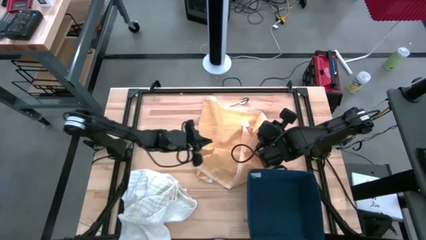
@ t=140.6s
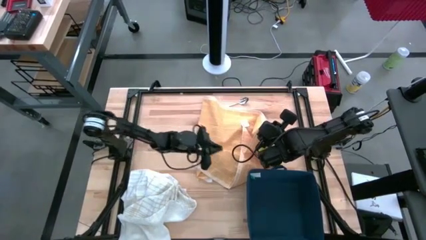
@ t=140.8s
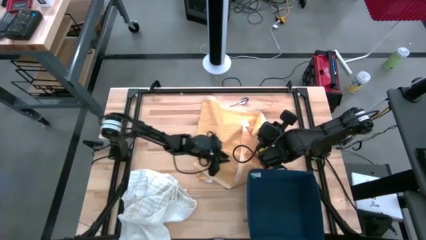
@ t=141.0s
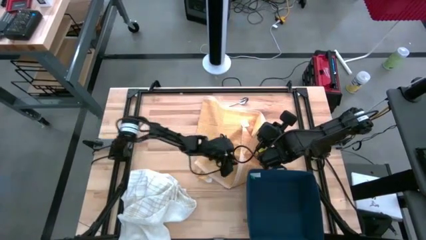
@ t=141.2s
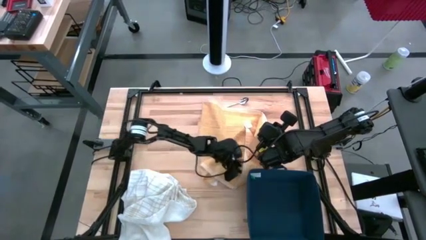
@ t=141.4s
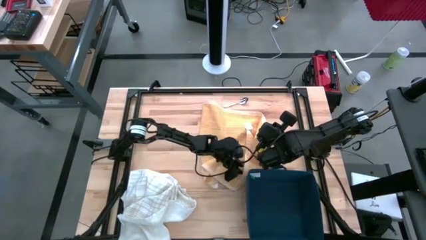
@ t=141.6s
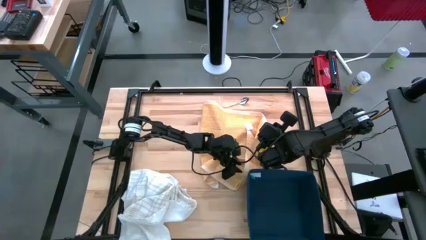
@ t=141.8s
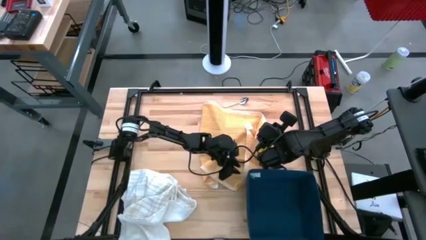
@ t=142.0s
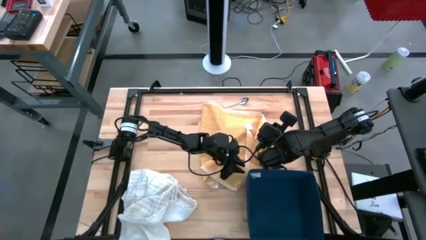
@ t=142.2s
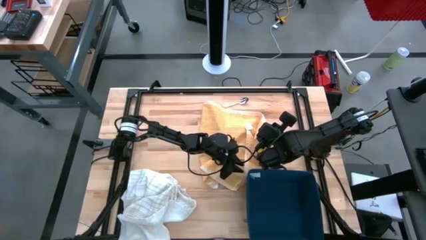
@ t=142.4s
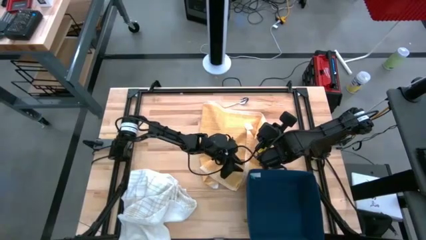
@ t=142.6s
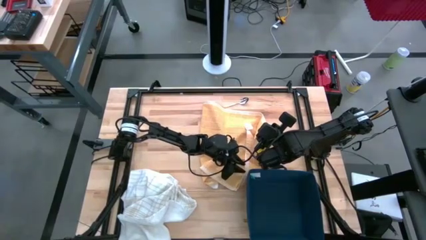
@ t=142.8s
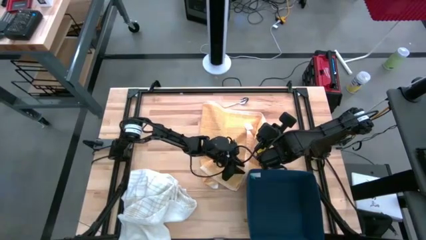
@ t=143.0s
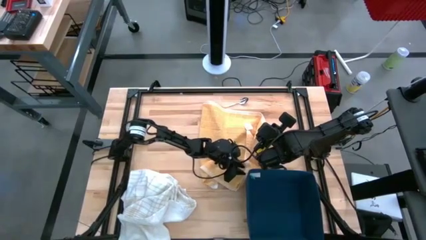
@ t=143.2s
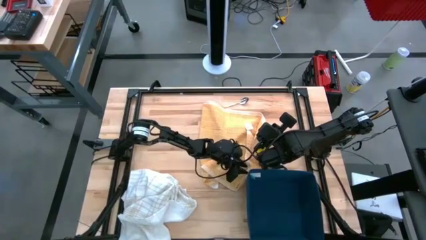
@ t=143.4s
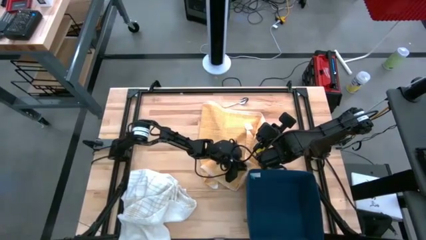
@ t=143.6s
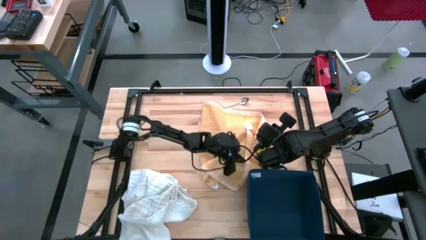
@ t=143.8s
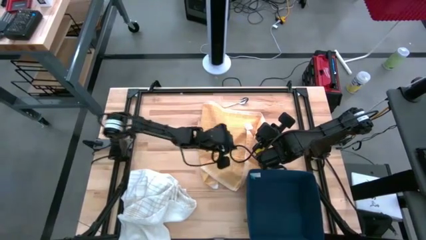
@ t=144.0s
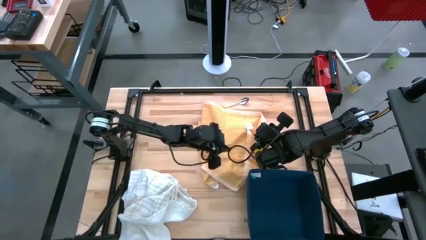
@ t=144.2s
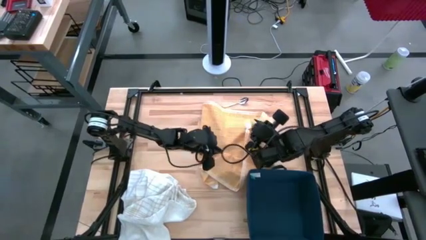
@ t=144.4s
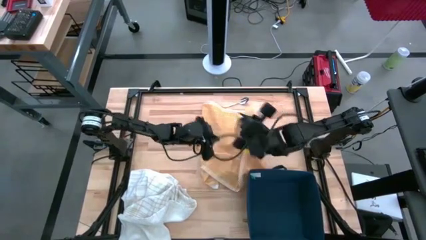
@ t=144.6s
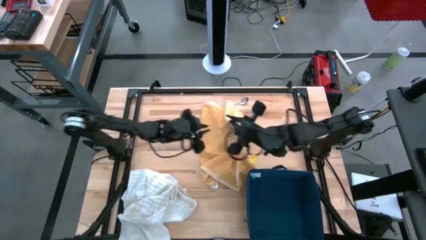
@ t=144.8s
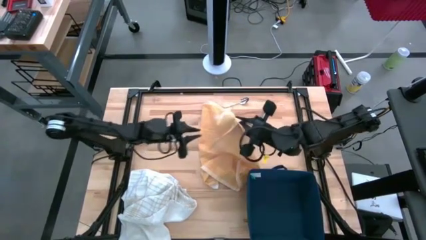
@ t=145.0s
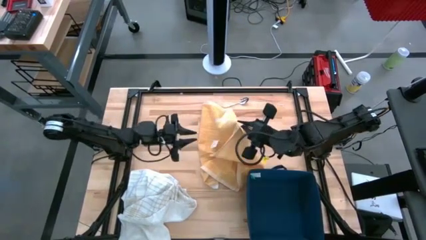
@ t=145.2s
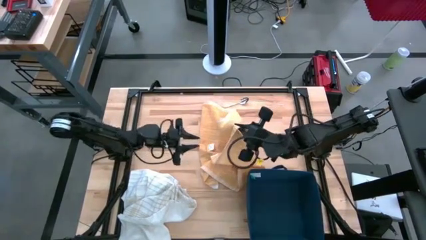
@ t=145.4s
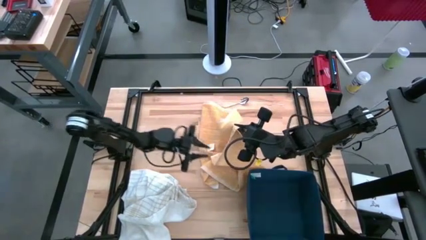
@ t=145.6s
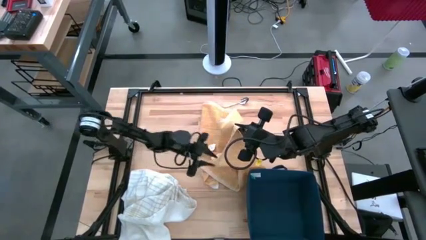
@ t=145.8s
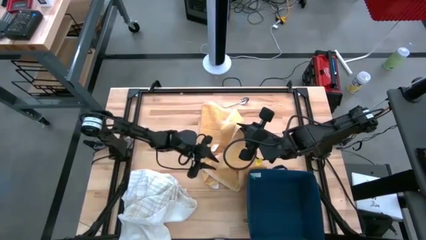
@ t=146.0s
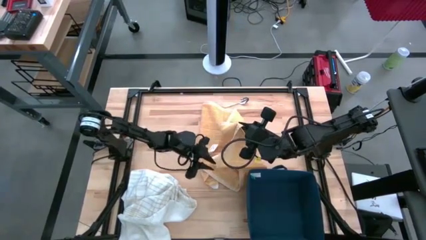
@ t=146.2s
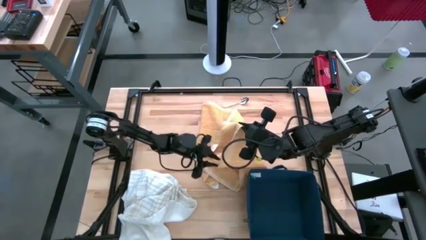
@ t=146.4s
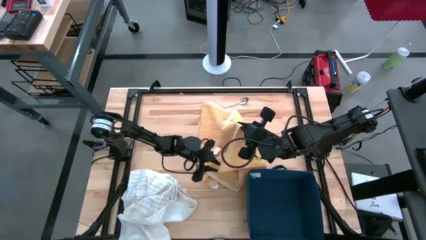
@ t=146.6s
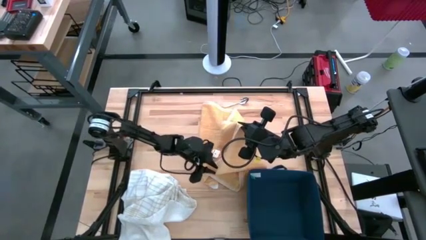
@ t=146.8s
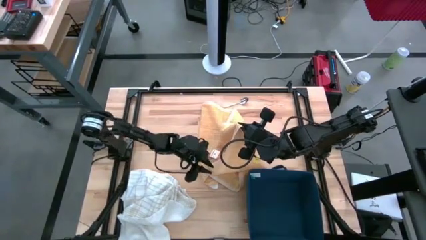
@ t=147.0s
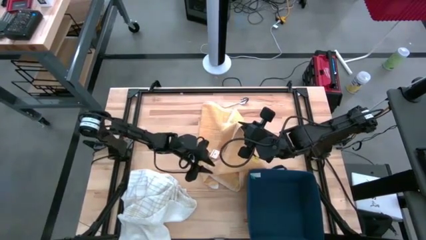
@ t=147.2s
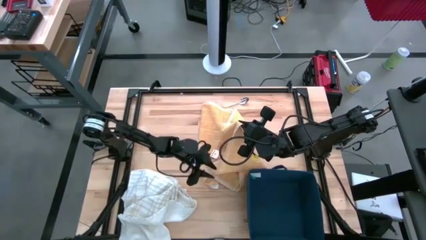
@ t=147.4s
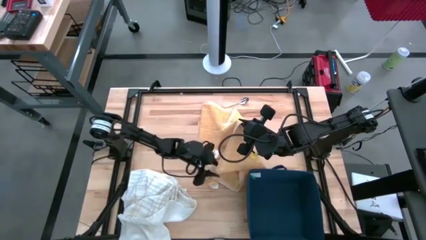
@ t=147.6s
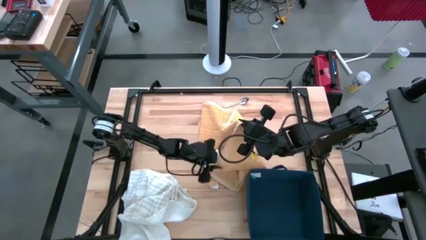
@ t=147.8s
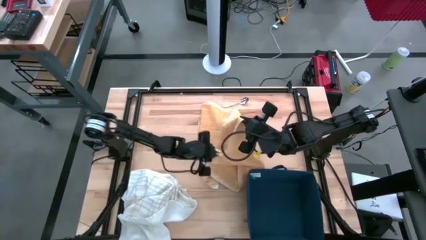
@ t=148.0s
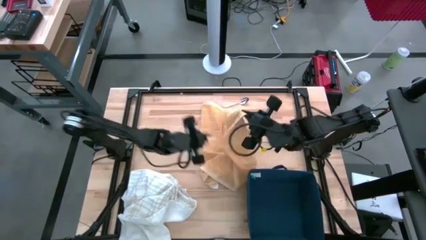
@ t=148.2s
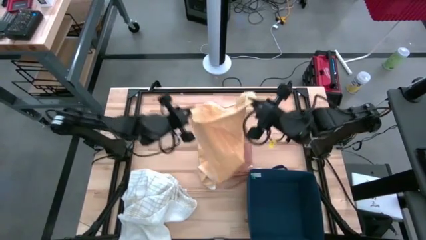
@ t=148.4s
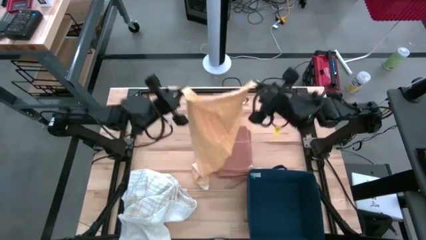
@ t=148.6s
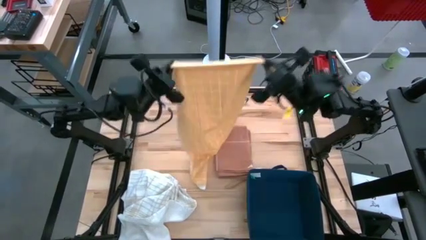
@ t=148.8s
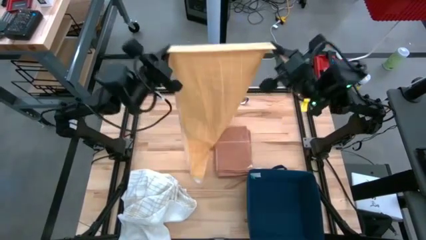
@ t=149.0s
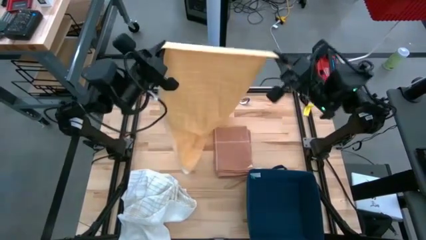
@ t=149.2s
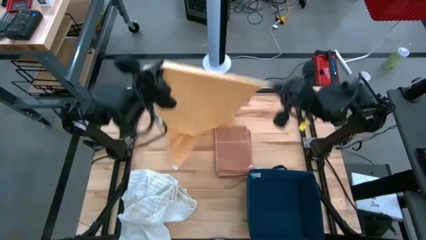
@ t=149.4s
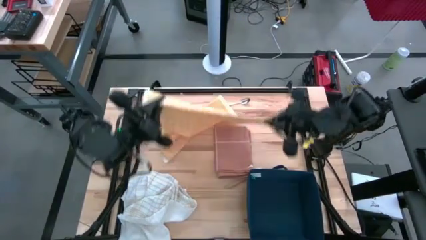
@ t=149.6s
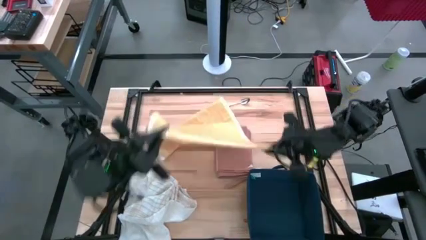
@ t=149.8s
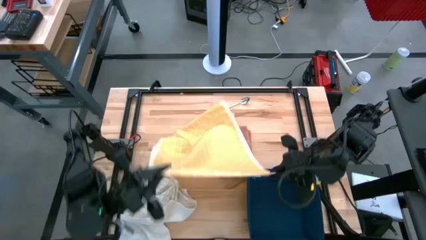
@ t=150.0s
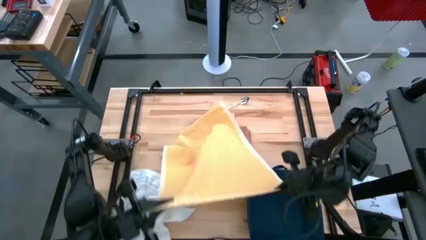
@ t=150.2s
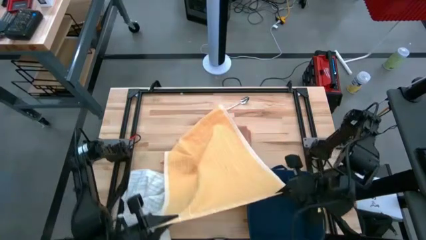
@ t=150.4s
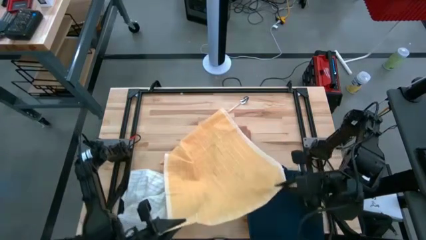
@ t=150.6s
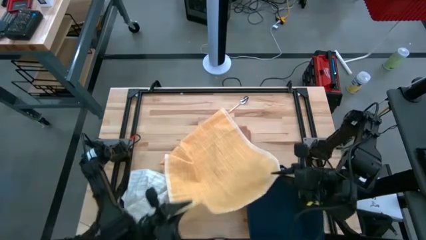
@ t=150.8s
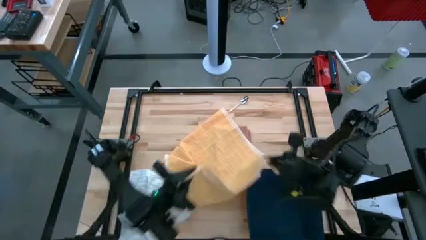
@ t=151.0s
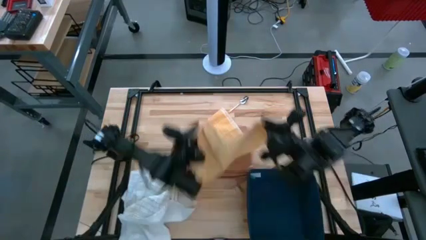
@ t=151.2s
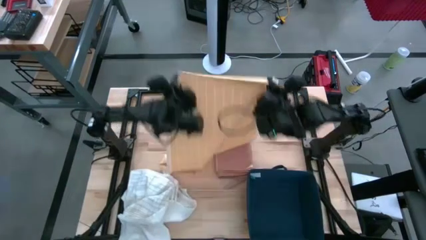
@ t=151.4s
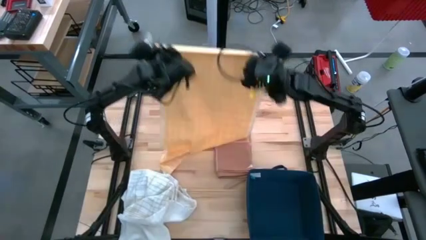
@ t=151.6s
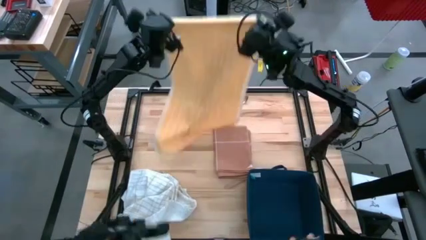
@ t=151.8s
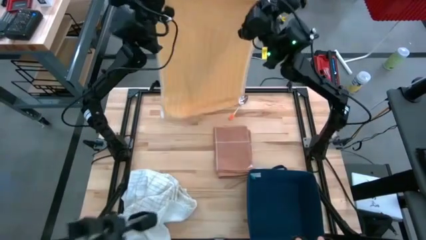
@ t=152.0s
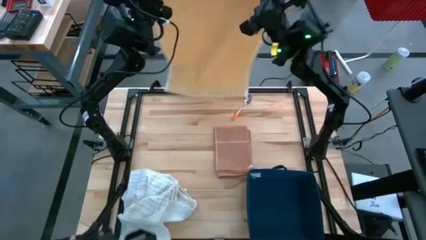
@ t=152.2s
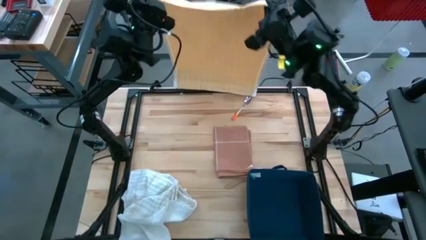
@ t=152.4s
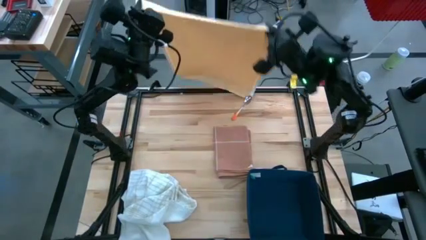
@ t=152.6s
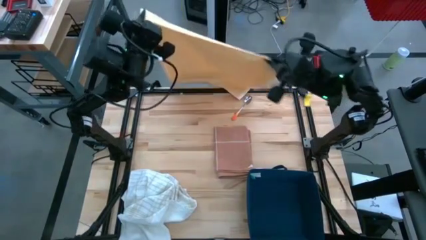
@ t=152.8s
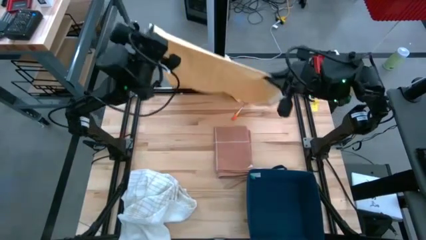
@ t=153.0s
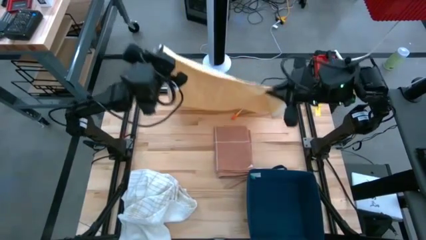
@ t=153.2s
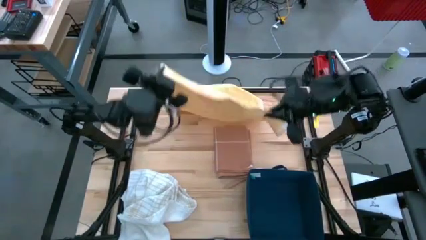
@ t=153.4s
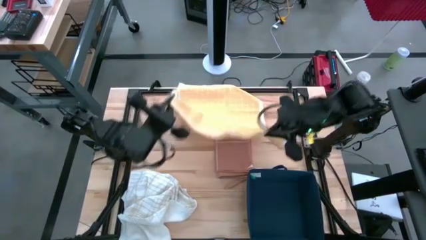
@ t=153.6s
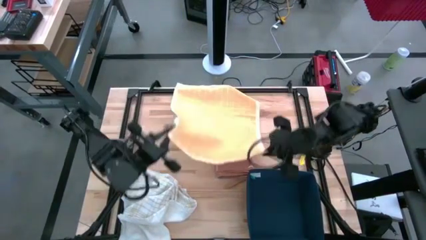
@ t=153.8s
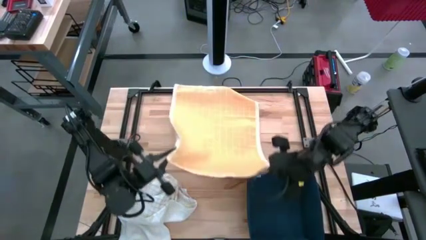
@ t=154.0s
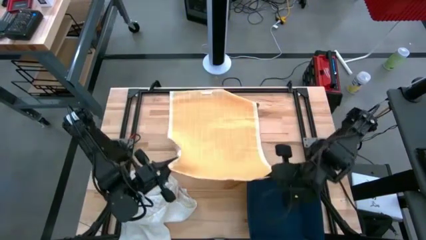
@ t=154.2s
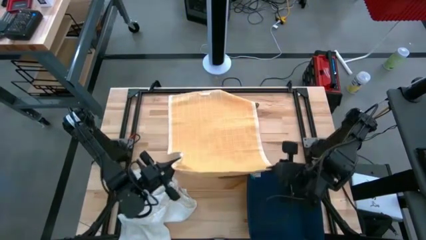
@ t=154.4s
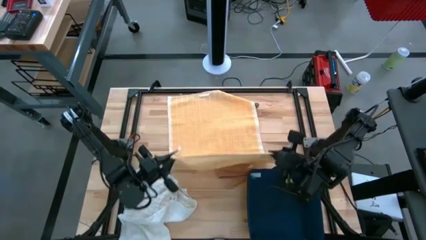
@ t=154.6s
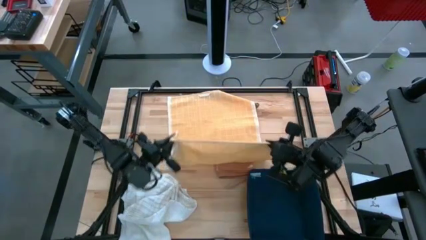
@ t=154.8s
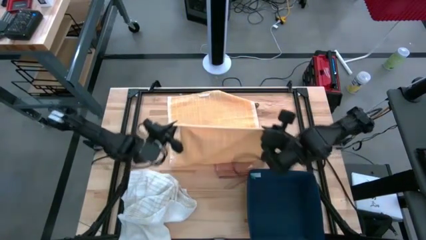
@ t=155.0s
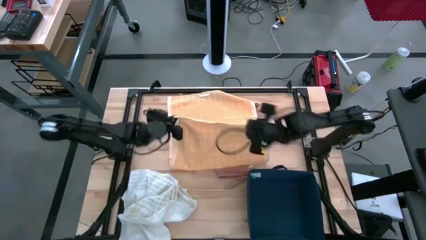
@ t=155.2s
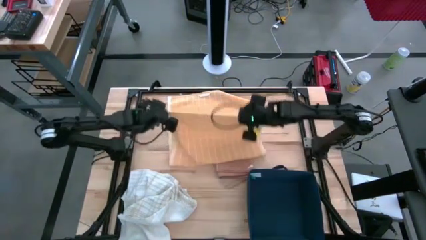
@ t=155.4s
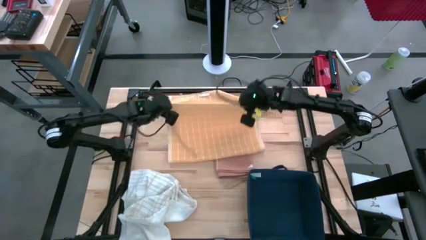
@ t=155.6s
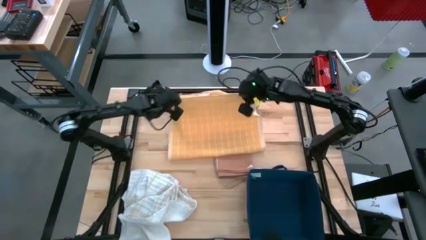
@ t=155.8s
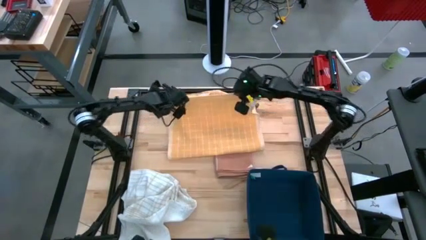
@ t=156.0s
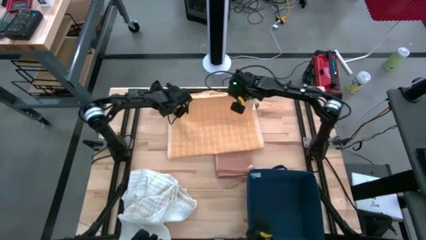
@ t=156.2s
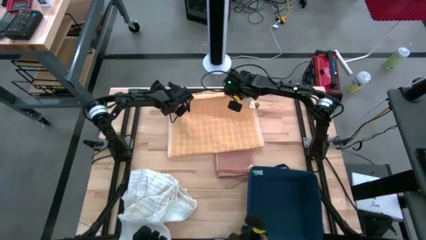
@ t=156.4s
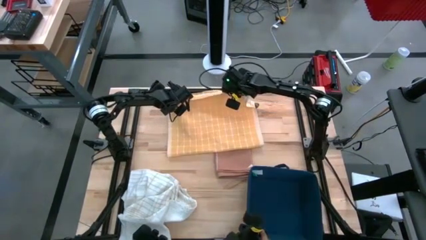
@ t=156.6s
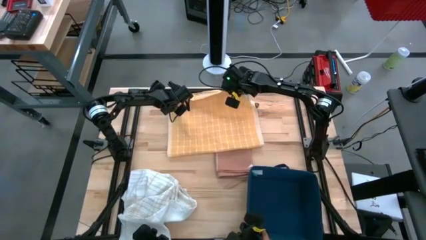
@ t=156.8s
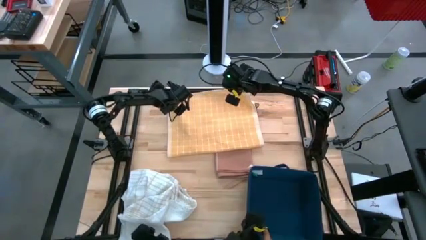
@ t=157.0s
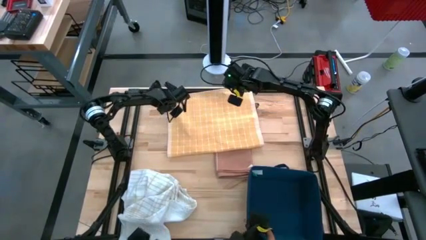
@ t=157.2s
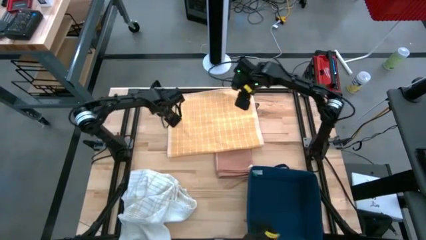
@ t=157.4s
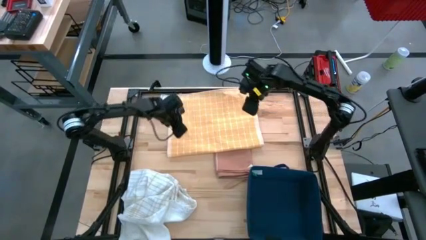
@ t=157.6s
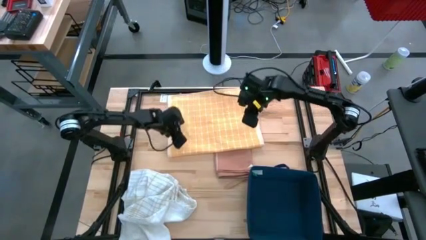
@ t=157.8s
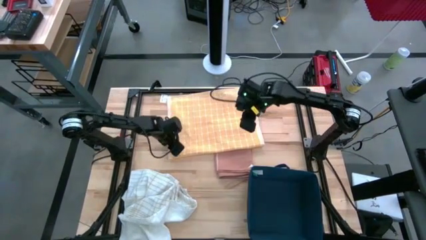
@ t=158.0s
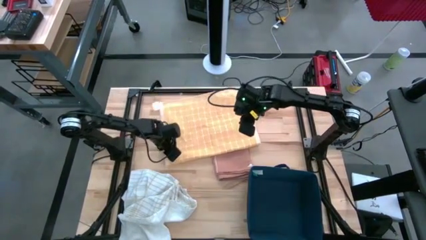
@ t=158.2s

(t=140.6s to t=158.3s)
Task: Fold towel
Fold the yellow towel
